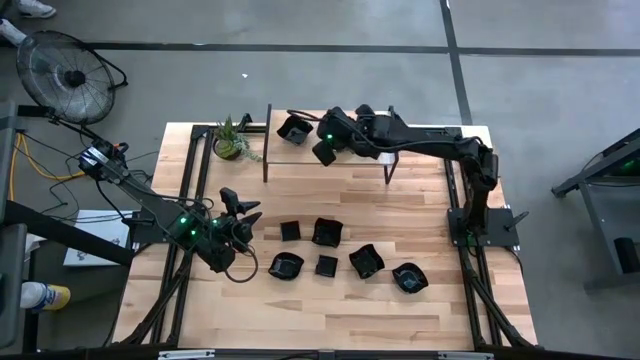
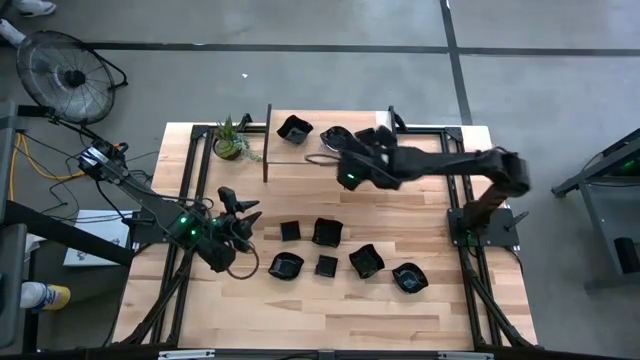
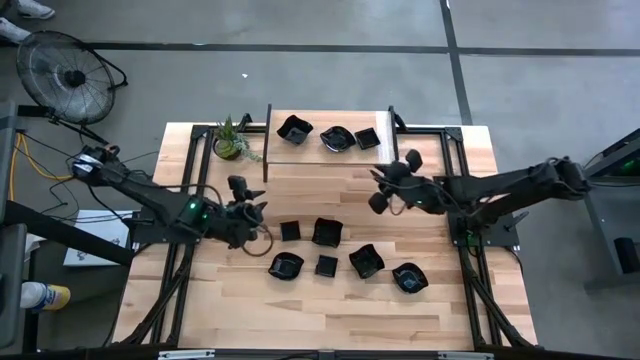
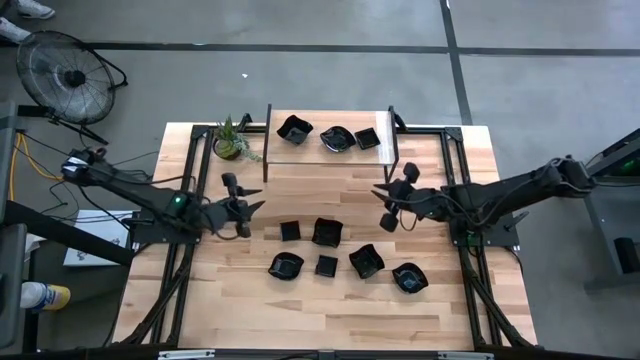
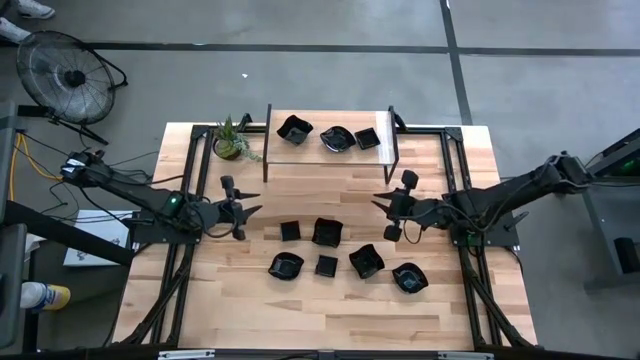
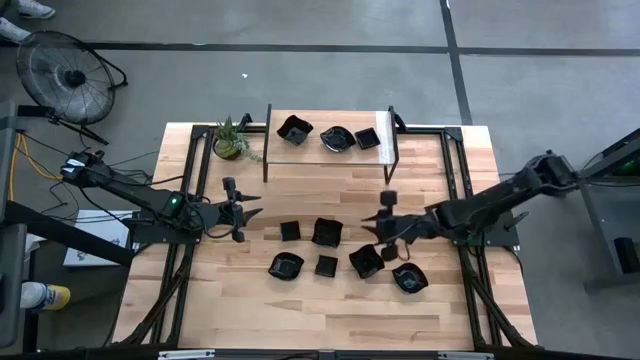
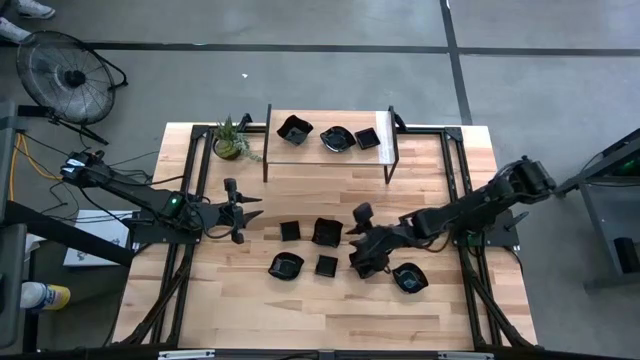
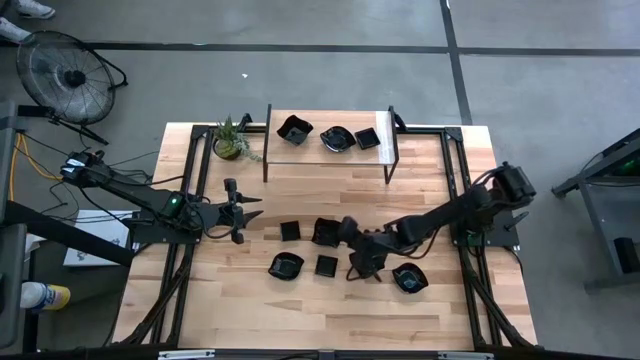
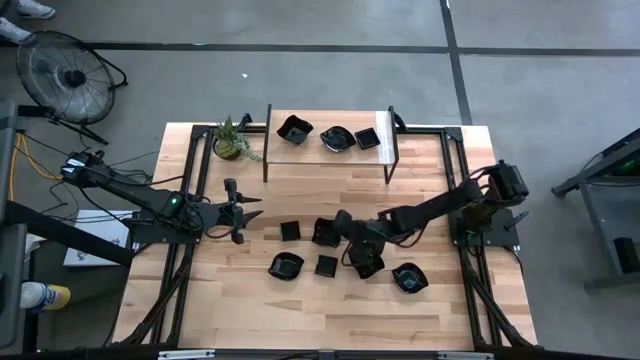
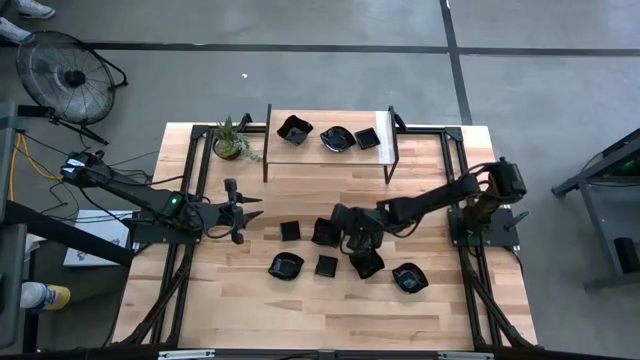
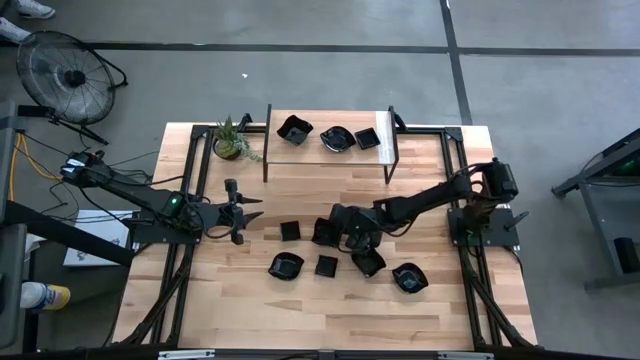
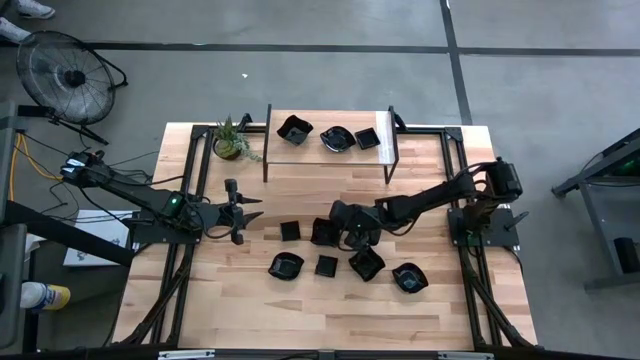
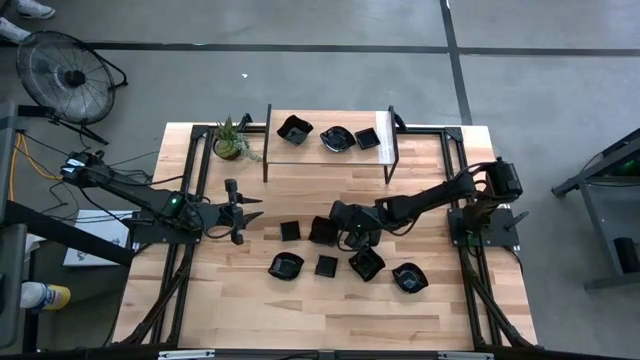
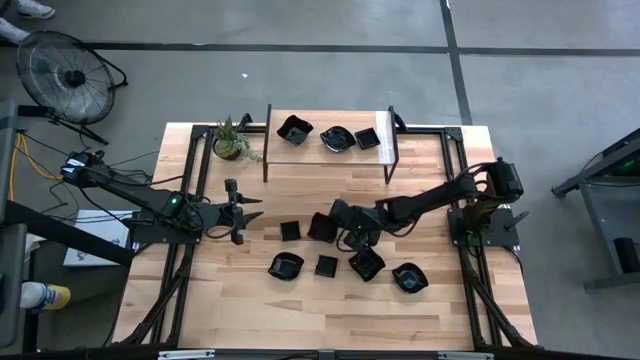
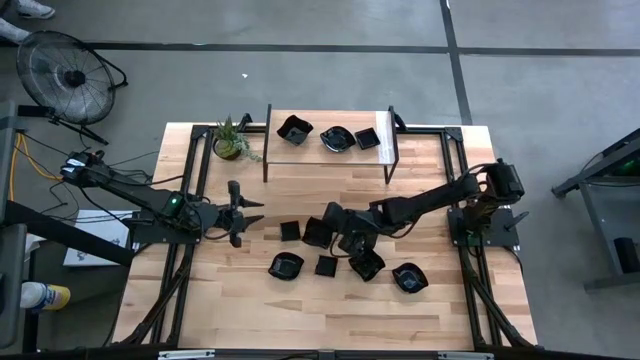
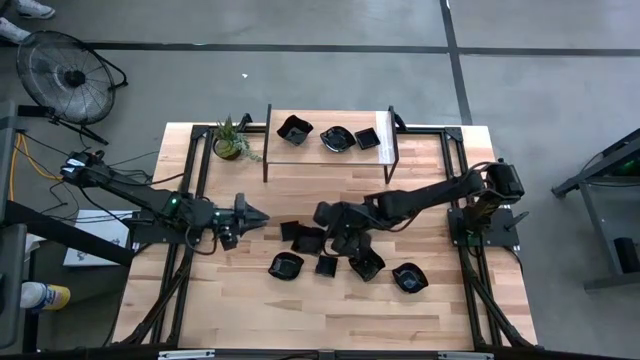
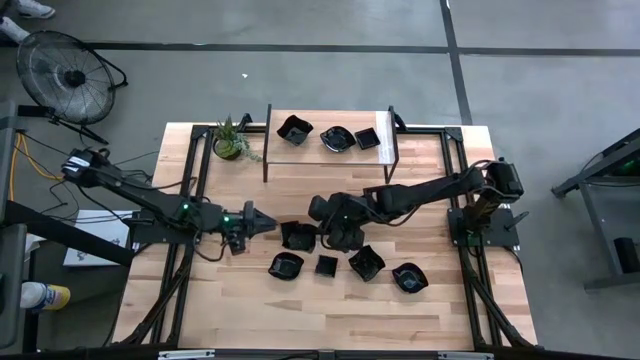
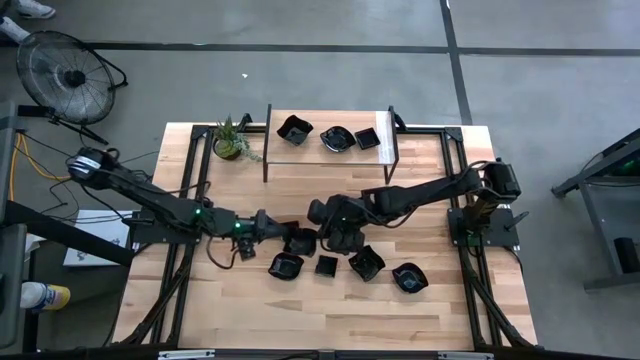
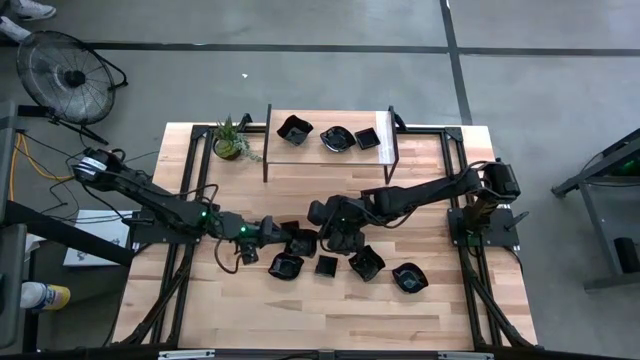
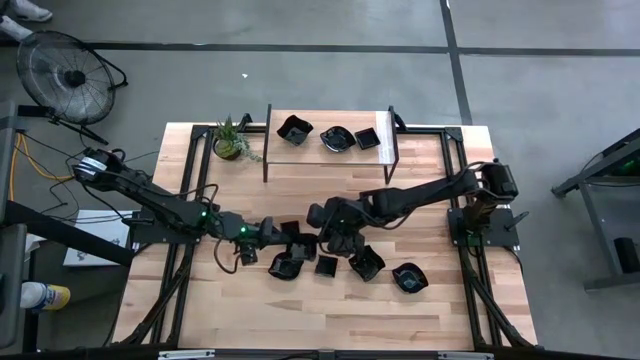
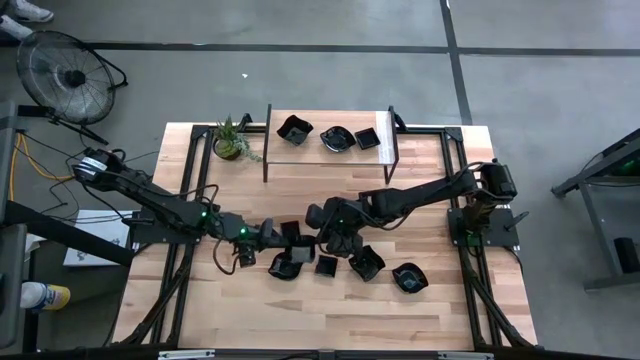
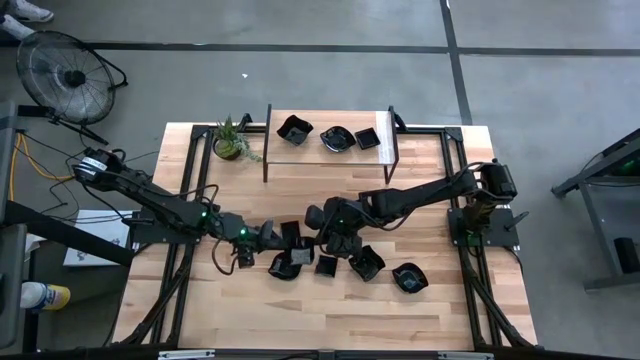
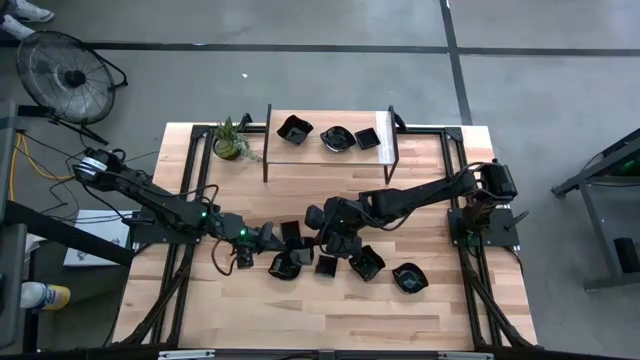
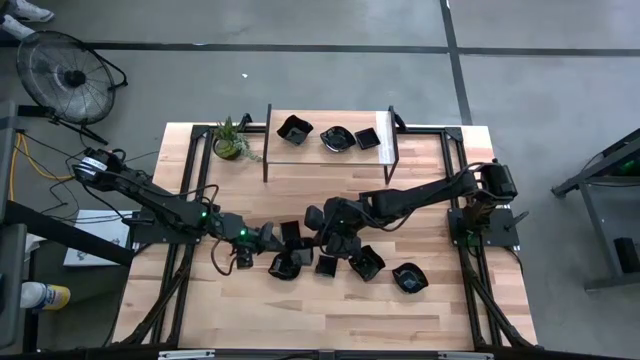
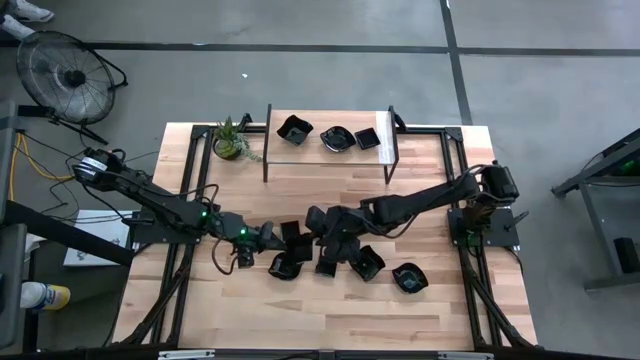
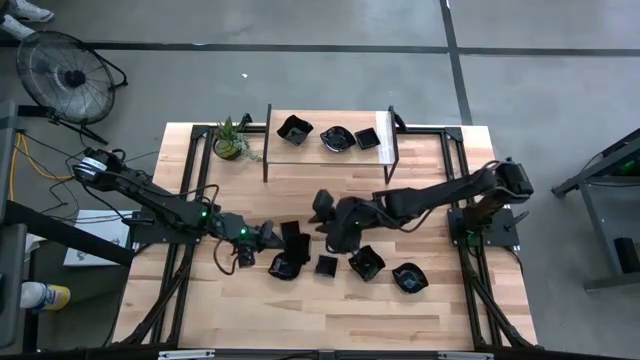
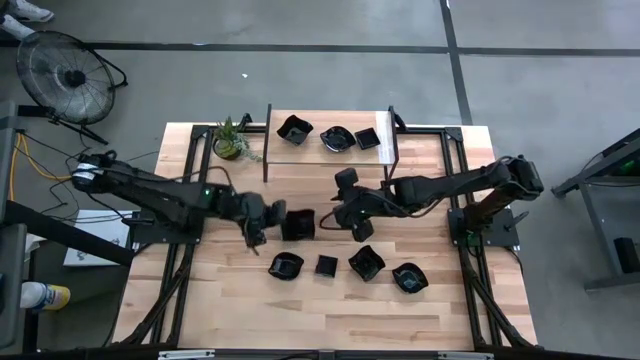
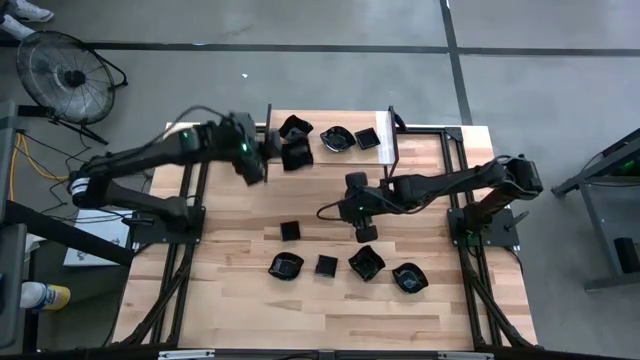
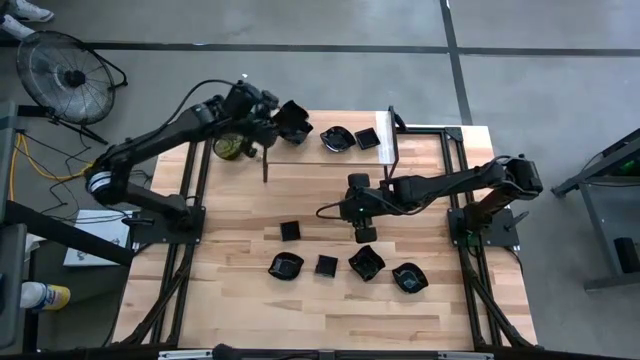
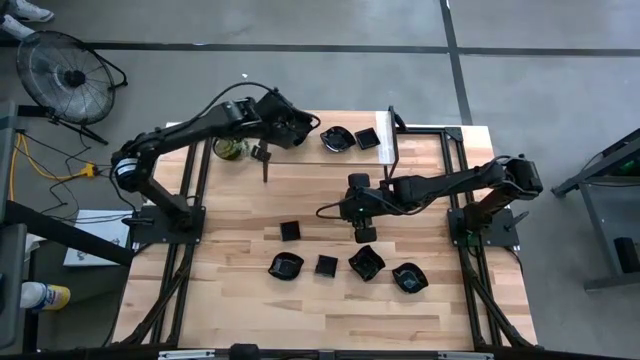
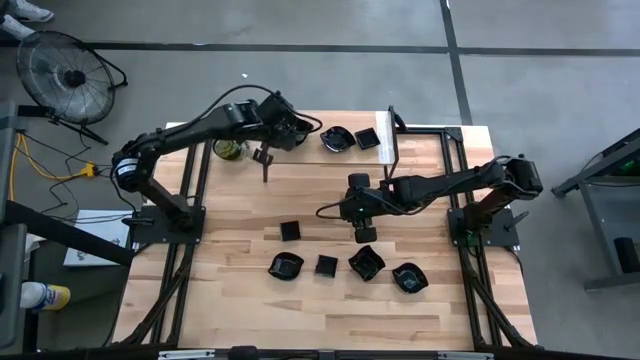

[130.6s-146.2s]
Task: Pick & Place Mini shaped plates
Stack the black distorted square plate on top of the black distorted square plate on the shelf

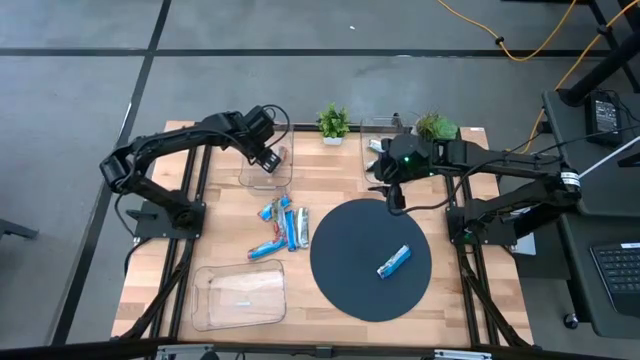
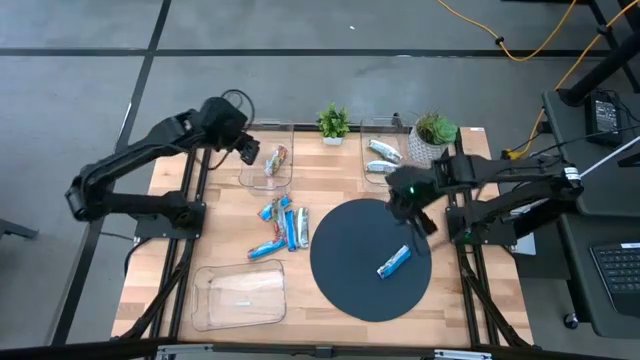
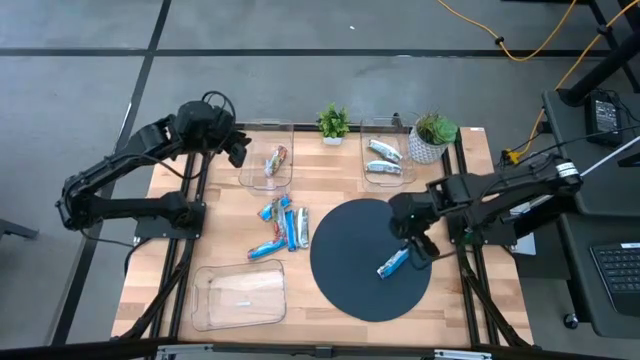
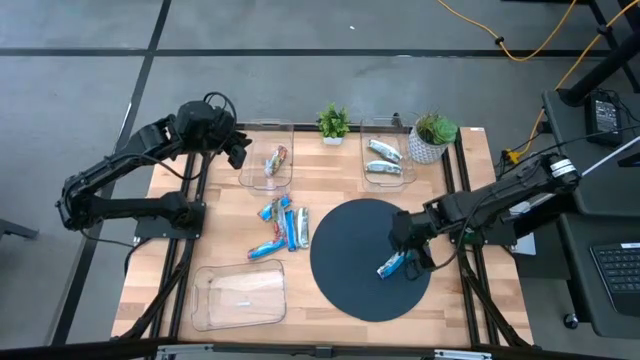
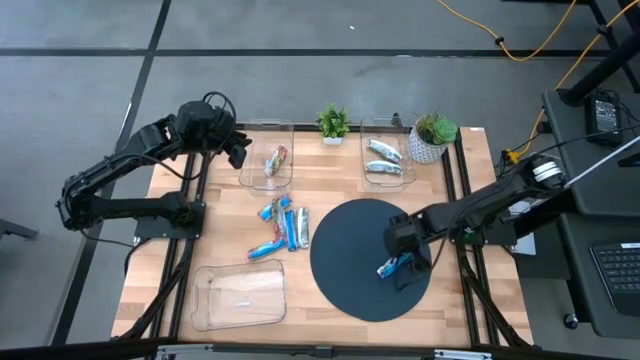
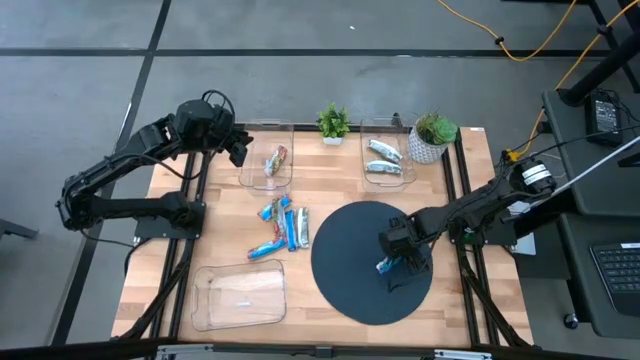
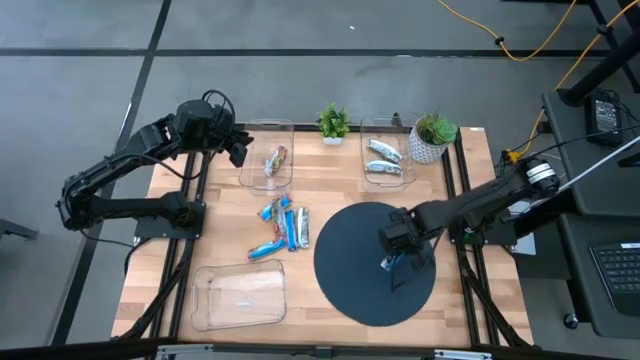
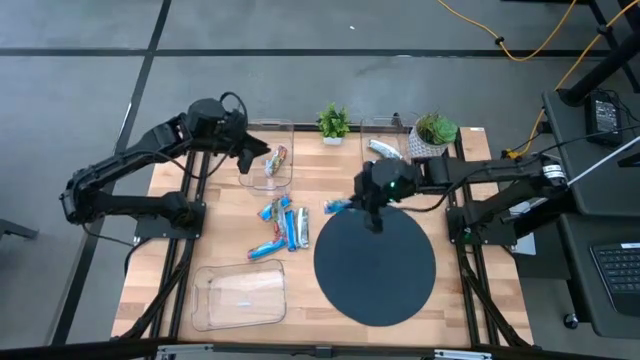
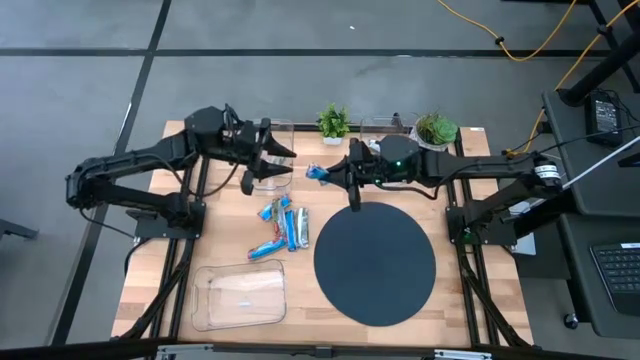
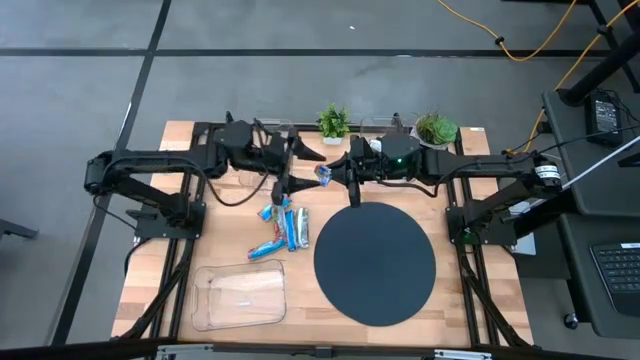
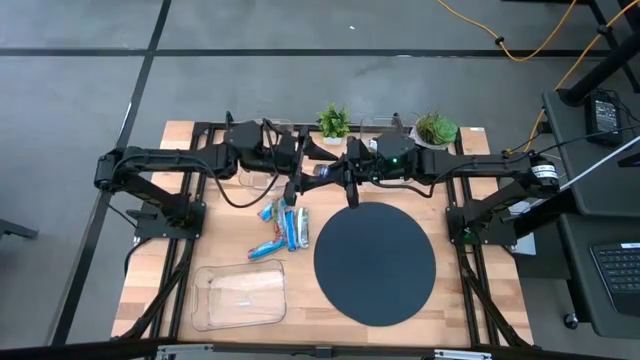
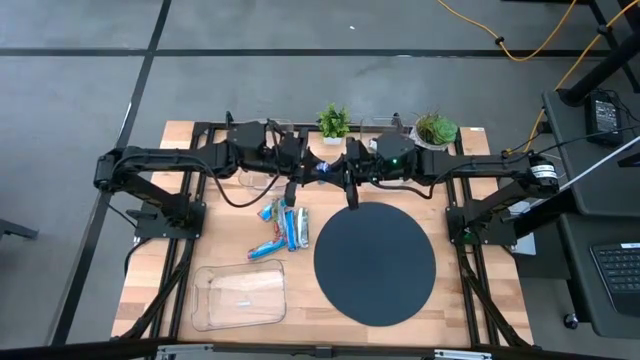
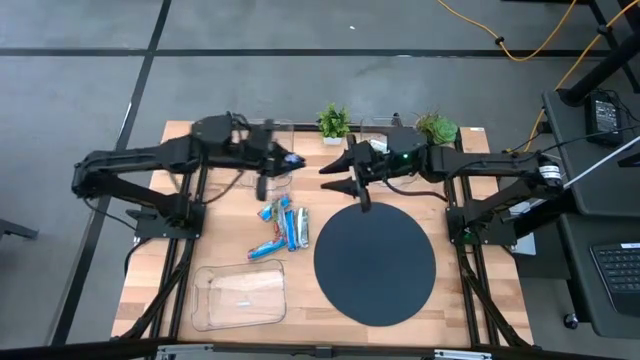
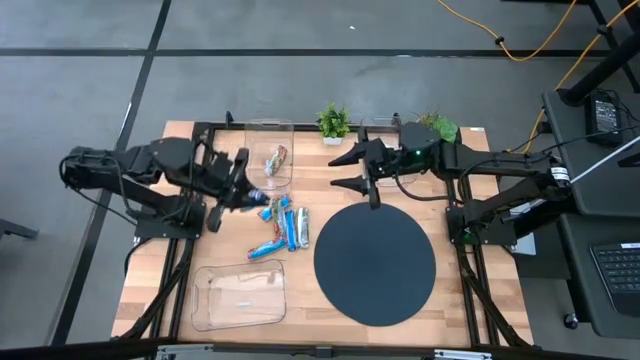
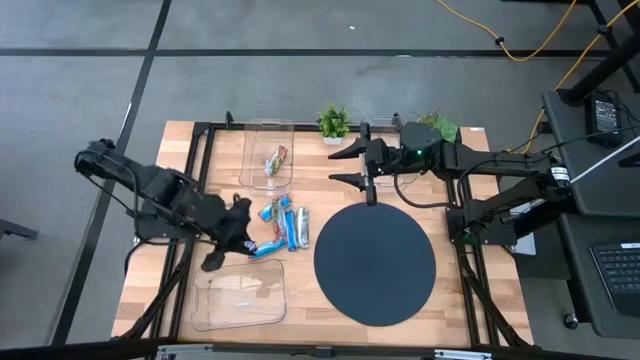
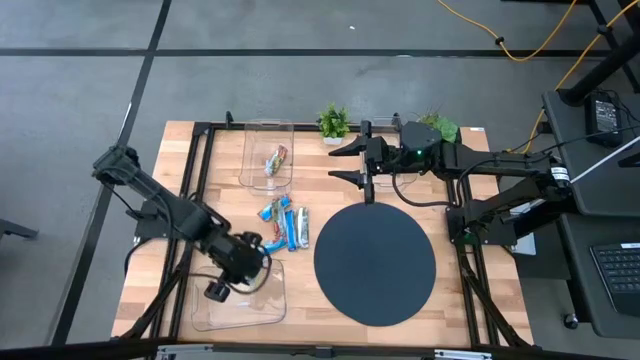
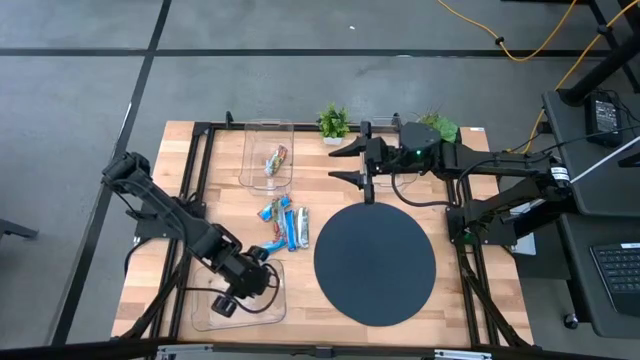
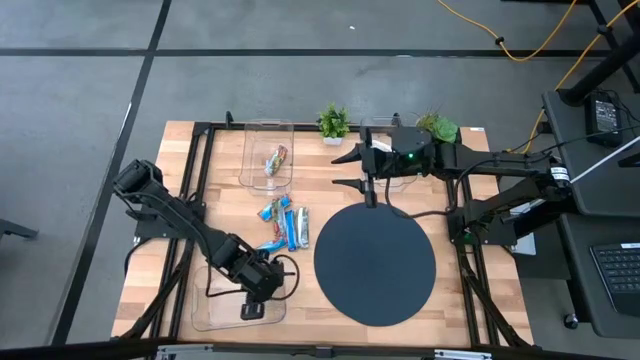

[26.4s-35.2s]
Task: Pick and place Granola Bars by type
Put the blue granola bar into the bottom transparent bin
